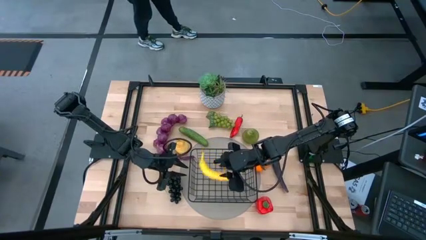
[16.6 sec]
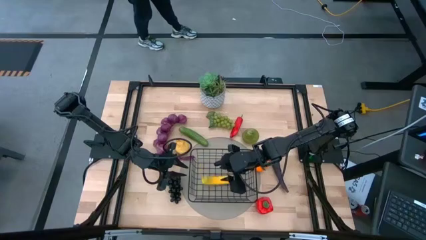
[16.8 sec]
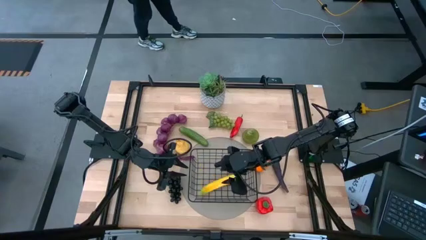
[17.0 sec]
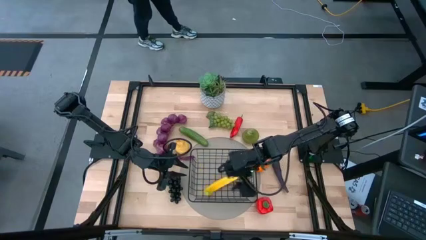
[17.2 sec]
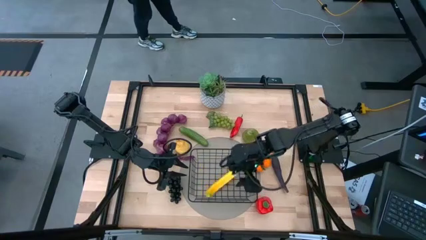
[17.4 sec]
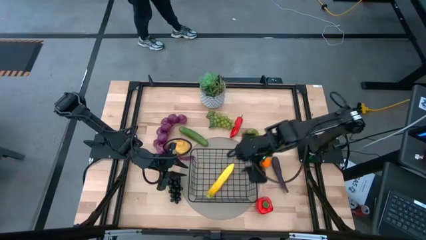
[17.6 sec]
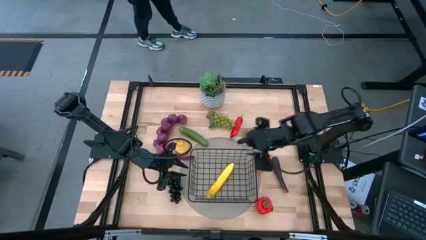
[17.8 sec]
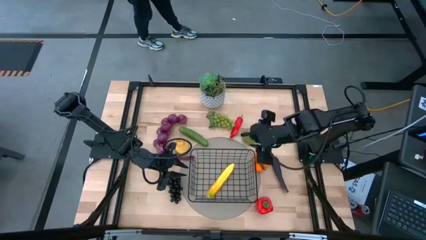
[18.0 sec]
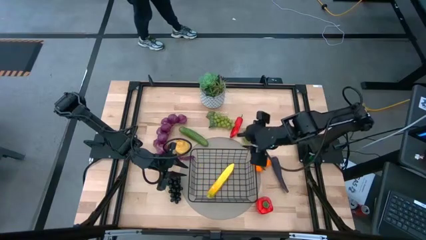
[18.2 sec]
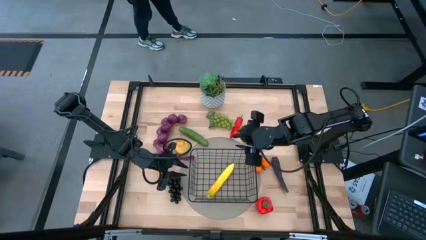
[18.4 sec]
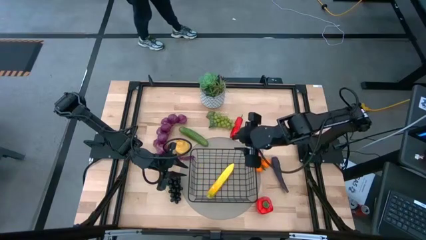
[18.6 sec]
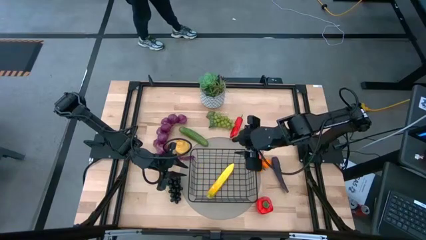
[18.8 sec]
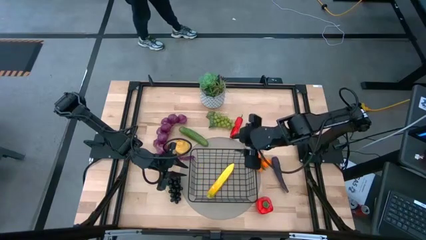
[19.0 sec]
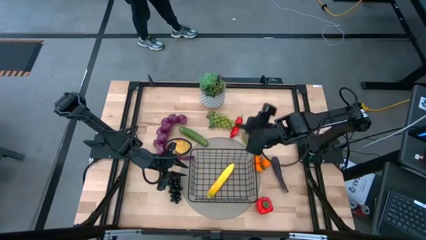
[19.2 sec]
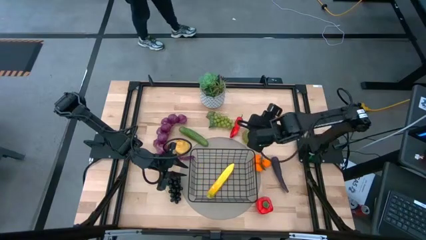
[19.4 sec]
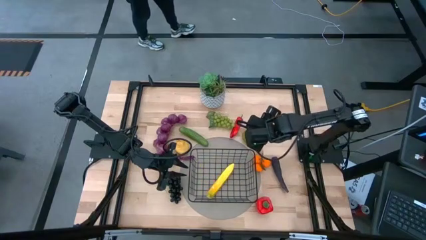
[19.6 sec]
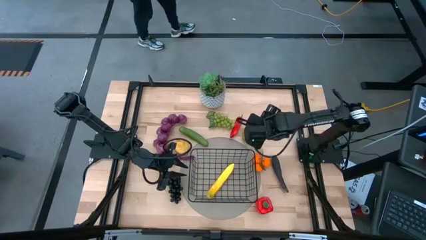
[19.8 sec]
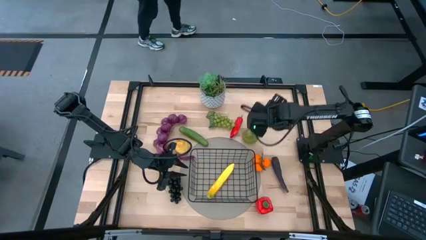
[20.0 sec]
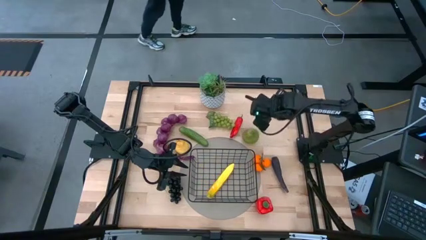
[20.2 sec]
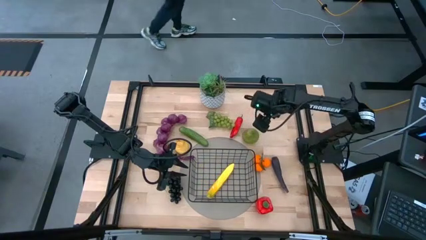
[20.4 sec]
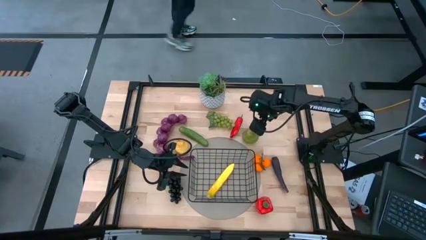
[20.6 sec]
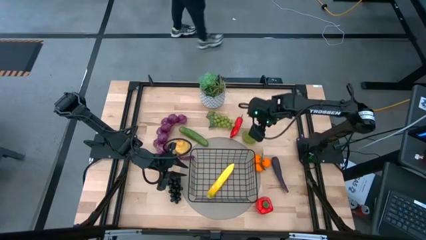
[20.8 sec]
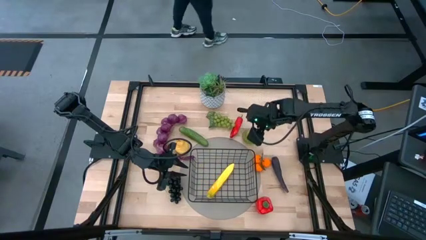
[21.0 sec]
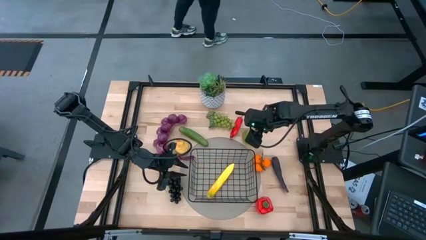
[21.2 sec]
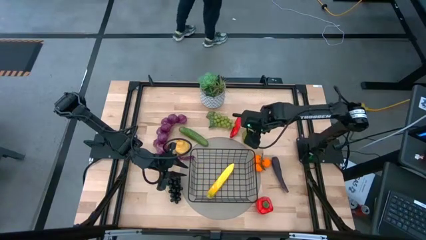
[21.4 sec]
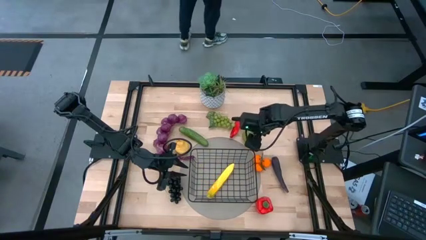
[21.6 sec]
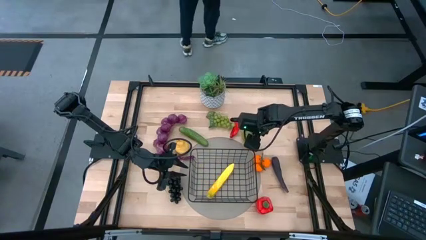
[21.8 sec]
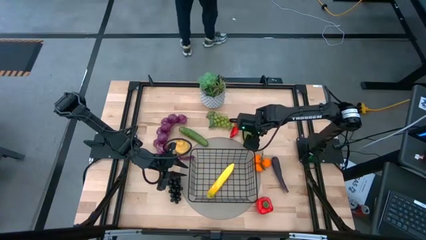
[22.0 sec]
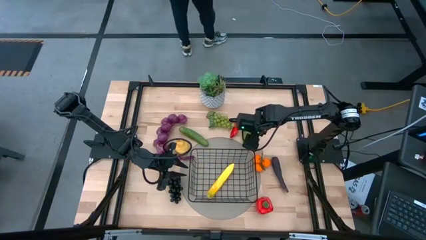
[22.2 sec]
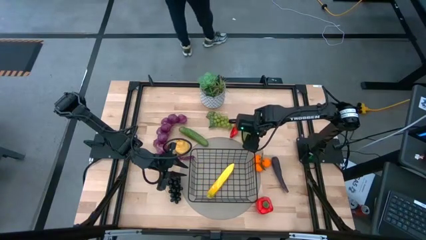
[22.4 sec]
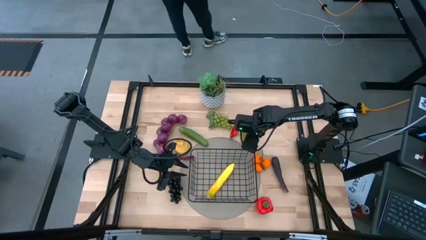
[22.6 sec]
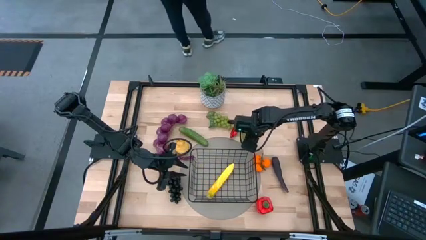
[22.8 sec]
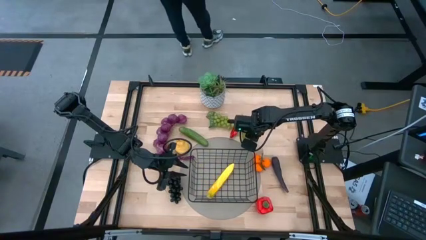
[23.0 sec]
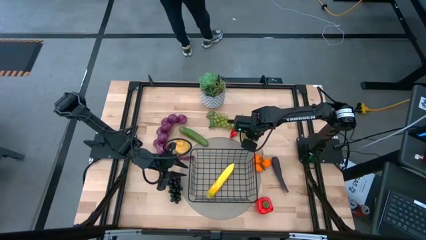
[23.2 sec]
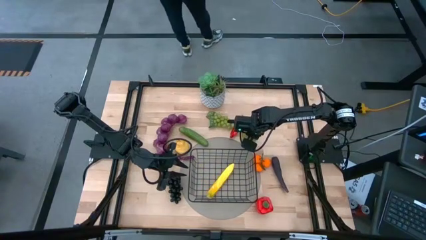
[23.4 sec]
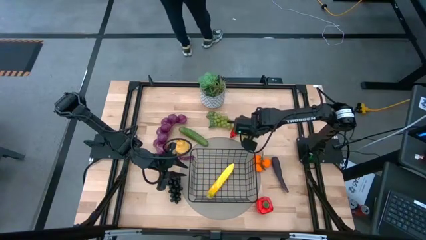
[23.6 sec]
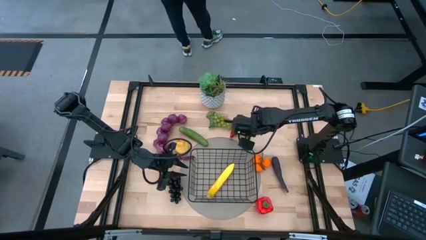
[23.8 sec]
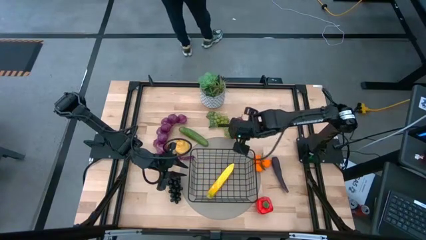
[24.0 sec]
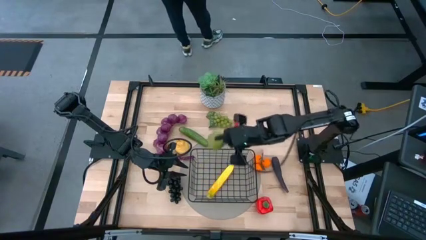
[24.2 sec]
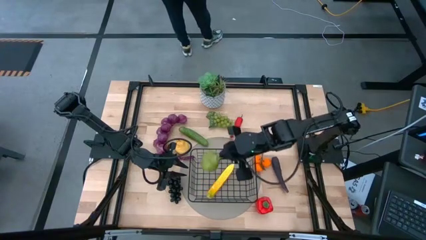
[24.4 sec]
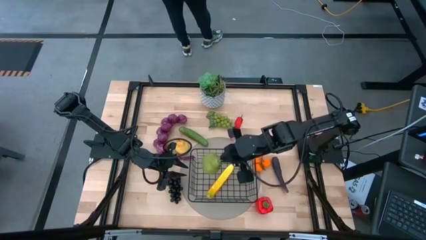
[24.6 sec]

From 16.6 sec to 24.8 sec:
Task: Build produce basket
Put the green pear into the black wire basket

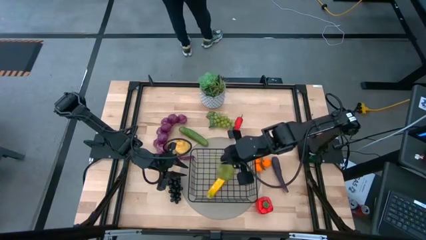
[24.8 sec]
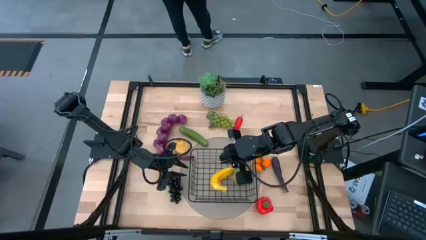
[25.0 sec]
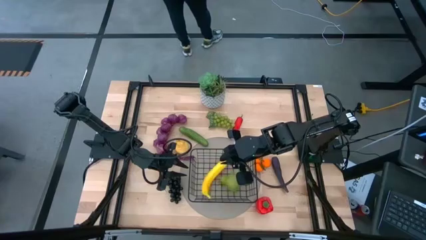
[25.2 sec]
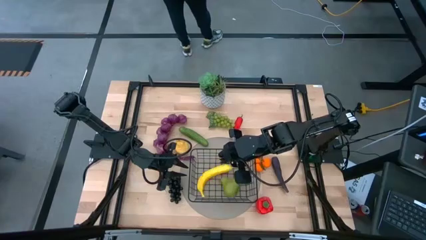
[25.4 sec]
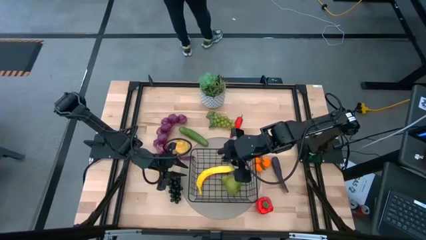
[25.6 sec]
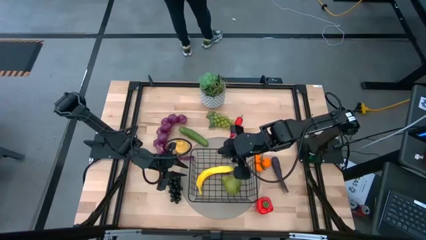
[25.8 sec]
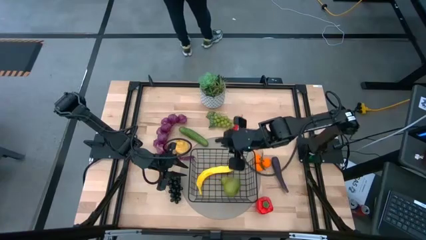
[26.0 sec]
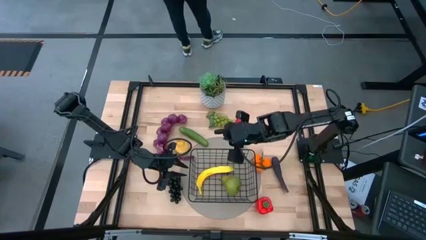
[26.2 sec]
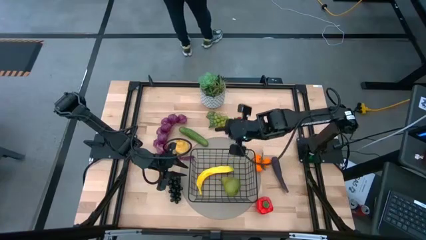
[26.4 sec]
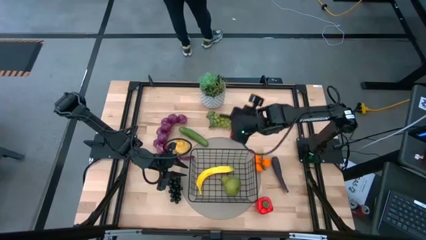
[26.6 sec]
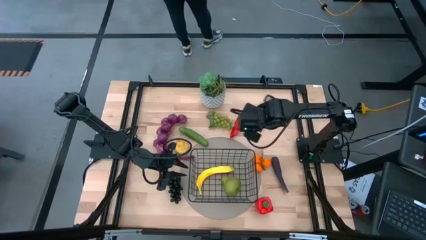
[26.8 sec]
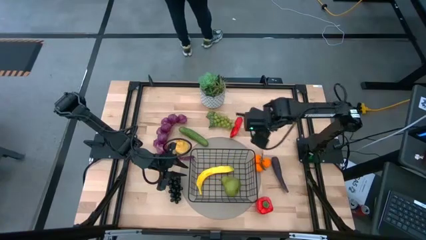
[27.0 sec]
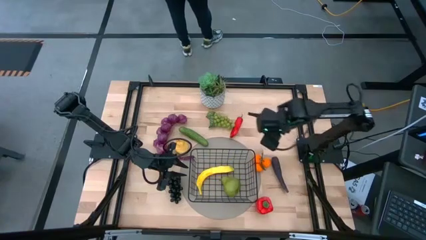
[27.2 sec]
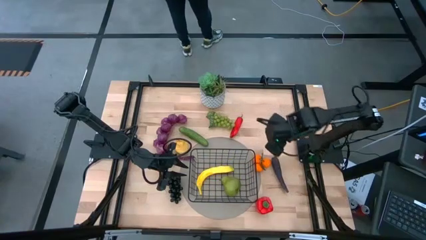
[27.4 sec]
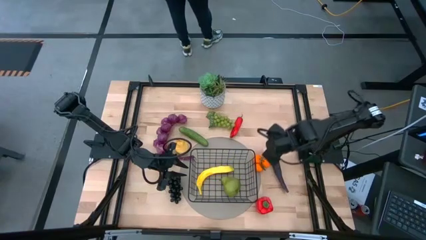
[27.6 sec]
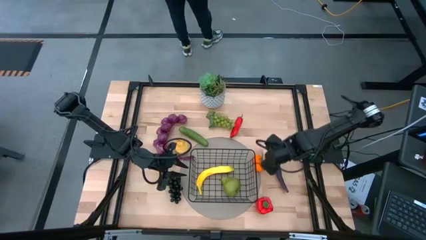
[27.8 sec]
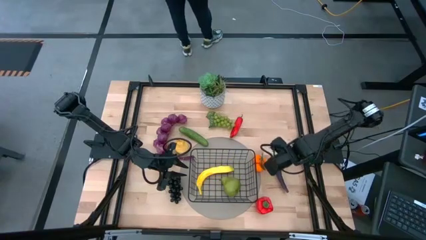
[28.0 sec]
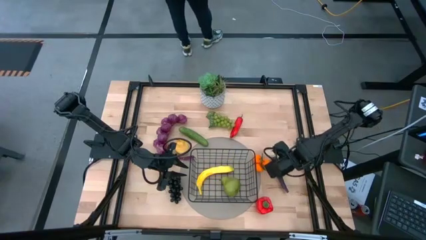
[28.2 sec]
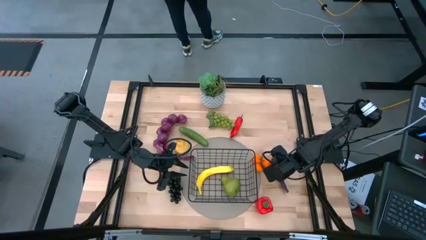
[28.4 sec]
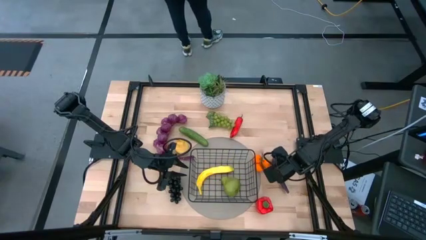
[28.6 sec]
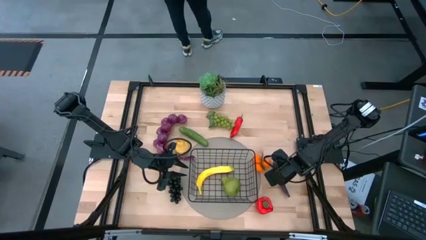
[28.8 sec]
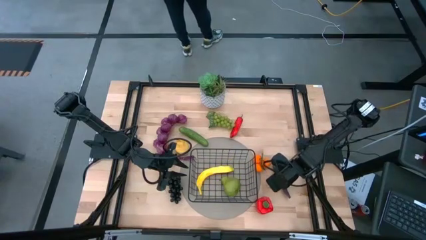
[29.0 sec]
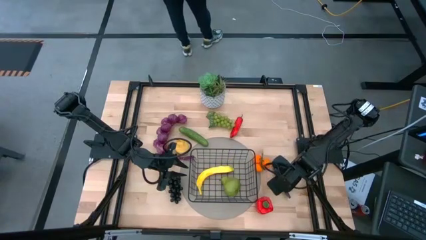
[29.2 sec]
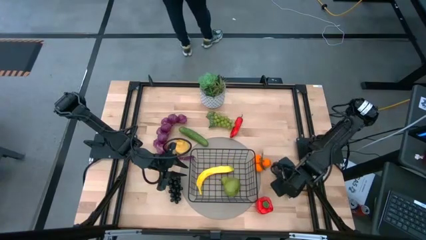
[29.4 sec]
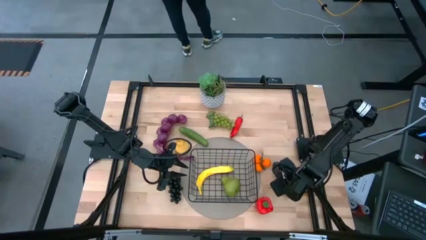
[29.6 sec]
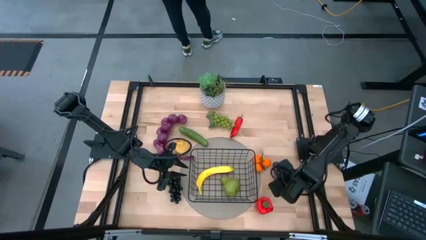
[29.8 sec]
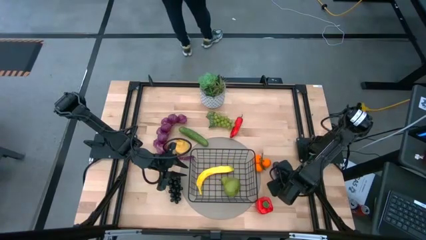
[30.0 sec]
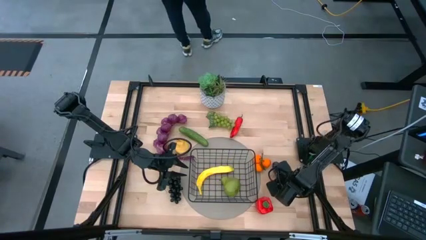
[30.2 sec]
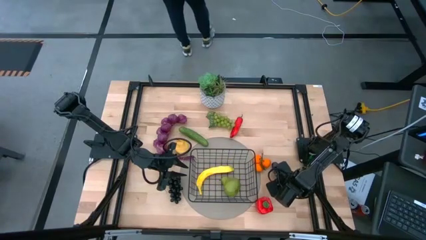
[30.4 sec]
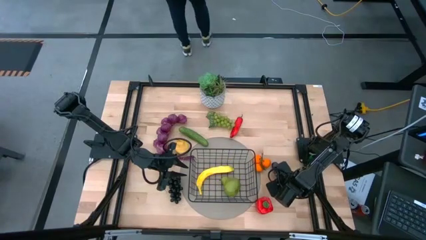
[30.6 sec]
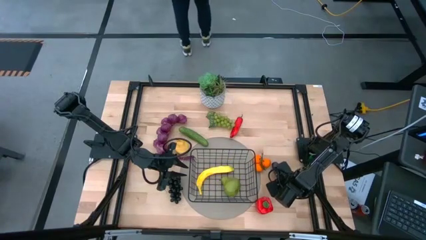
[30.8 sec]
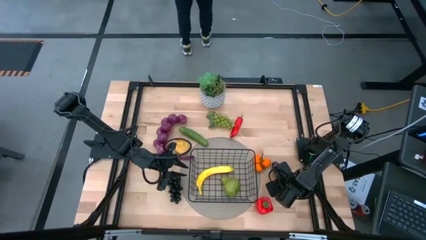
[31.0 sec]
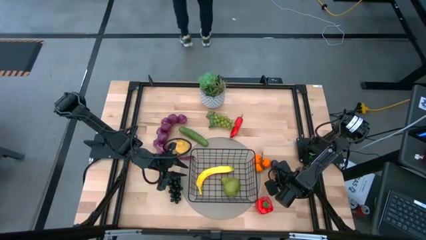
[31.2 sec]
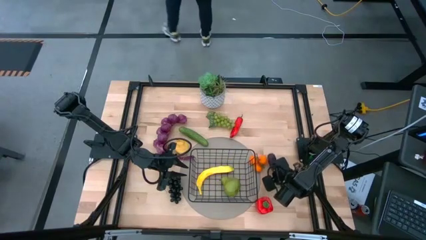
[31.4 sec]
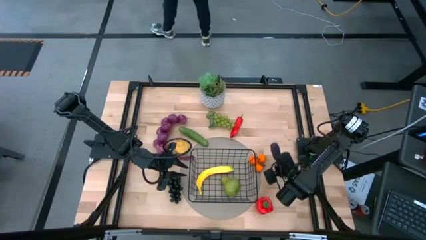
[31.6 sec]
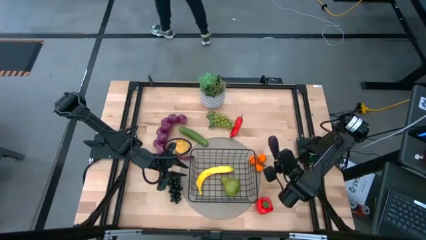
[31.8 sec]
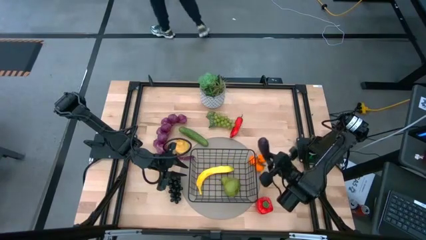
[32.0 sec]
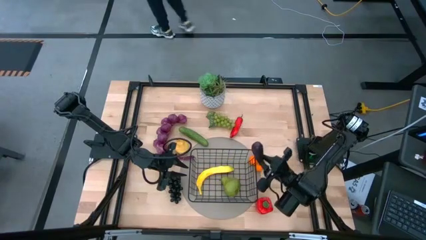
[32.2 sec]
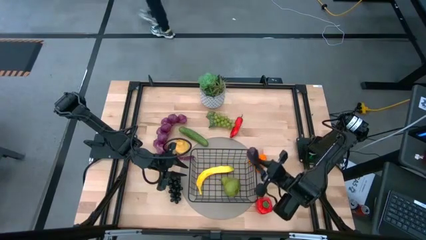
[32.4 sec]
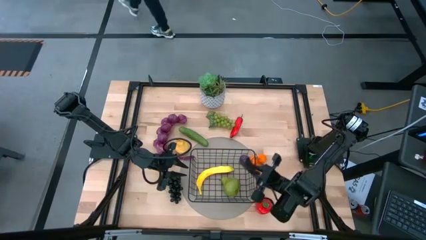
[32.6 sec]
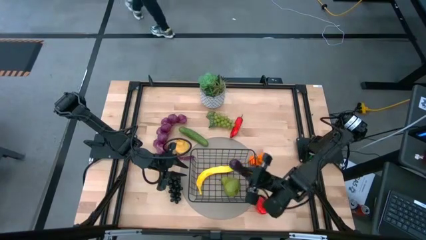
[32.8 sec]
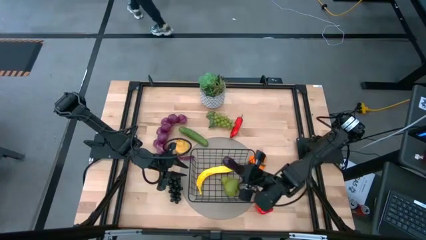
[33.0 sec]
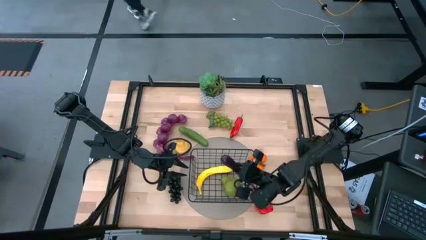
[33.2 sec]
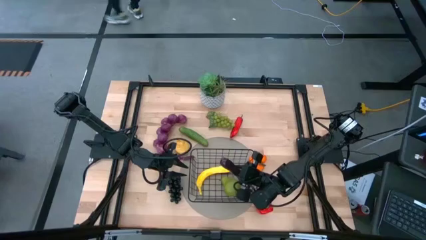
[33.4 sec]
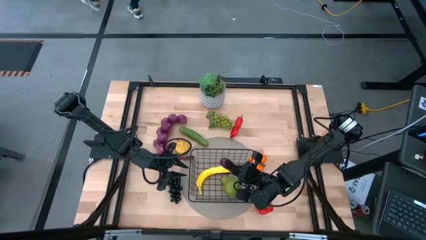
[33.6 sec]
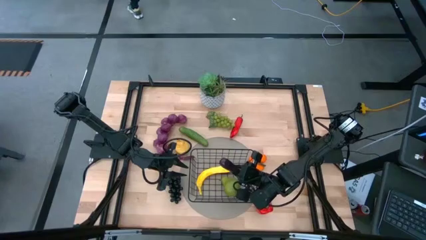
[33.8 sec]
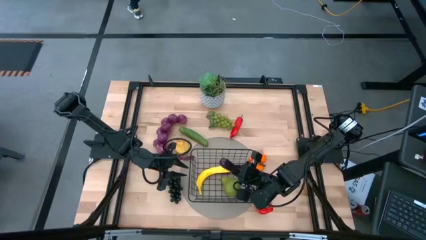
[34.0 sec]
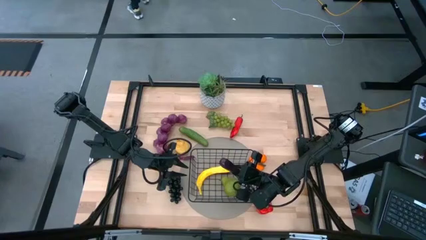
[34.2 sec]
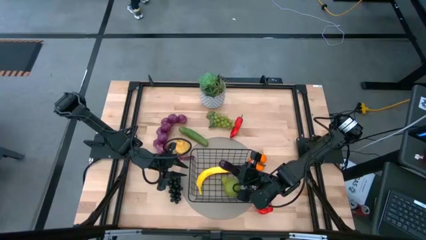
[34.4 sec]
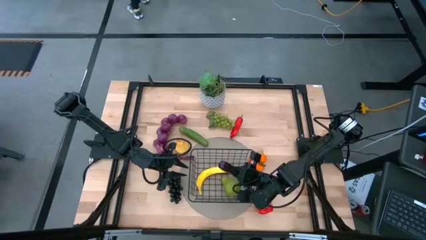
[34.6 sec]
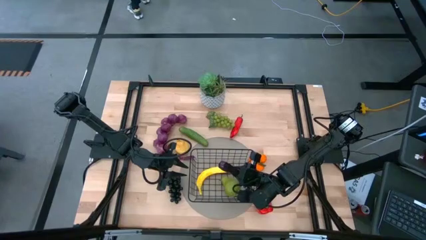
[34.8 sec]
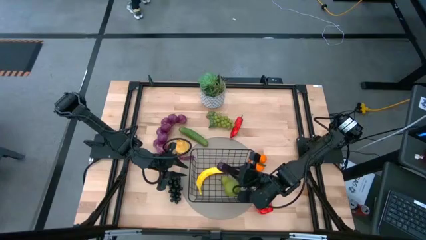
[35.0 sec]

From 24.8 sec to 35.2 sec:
Put the purple eggplant into the black wire basket
